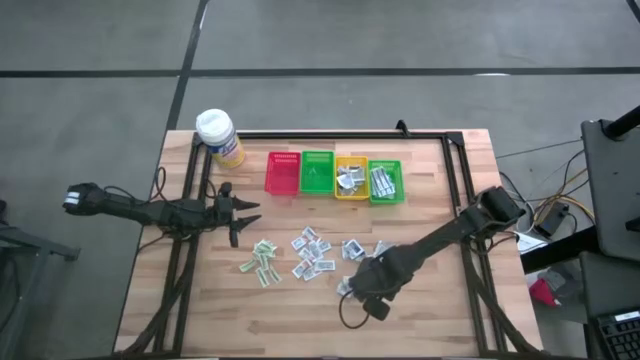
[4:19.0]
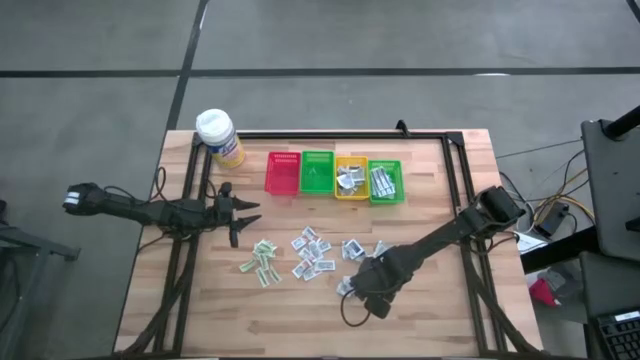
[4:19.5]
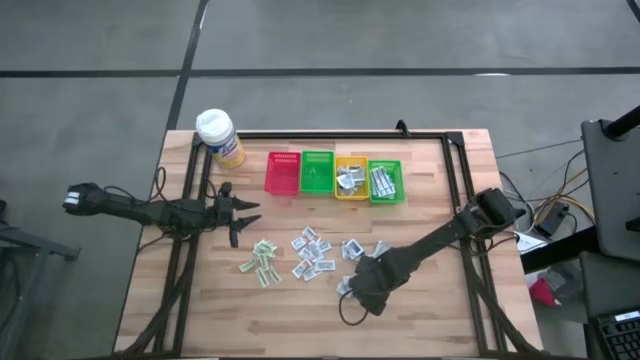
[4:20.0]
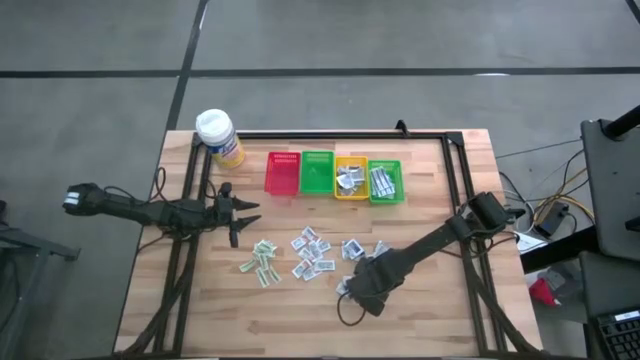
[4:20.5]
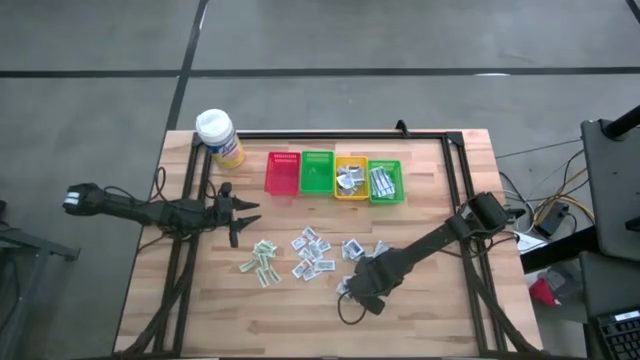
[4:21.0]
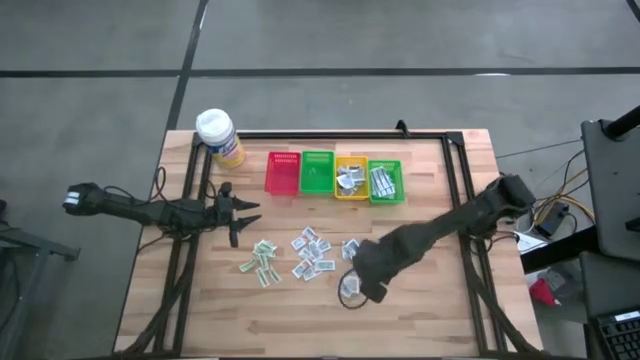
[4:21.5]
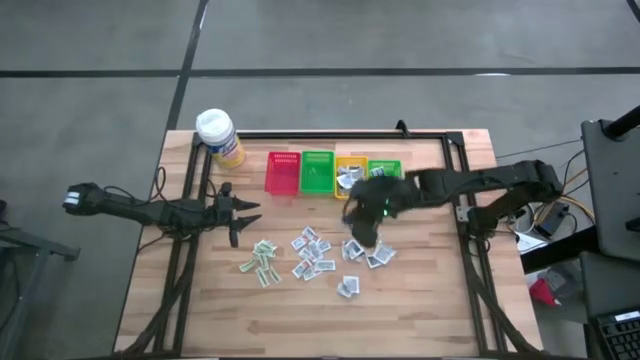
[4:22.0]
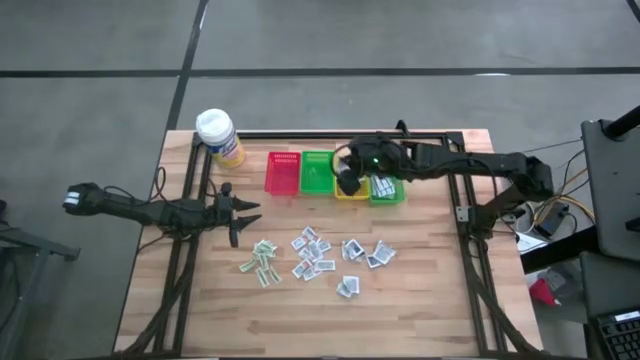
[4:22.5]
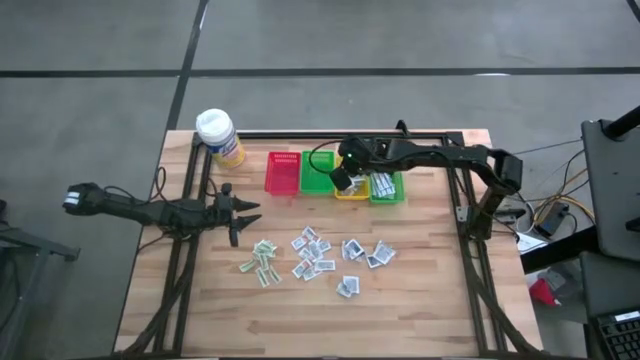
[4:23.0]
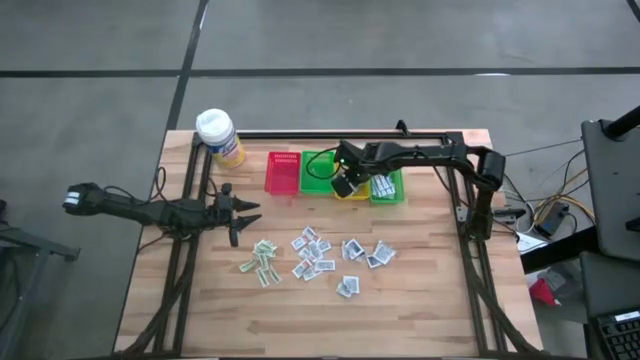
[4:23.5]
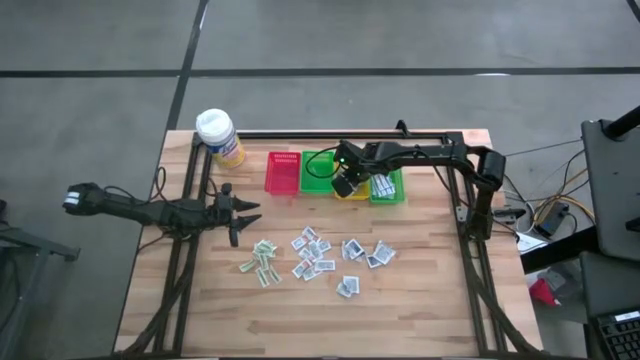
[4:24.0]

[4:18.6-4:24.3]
Task: Pick & Place First Aid Supplies
Put the blue alcohol pad into the yellow bin

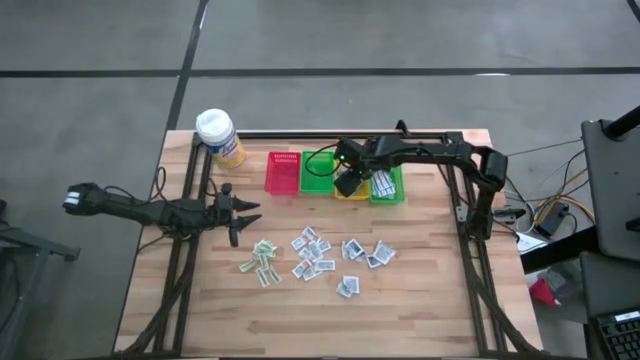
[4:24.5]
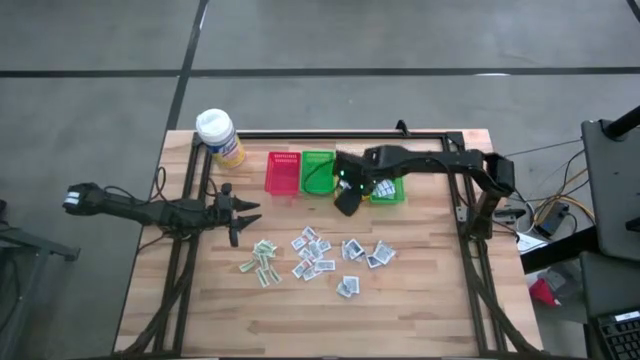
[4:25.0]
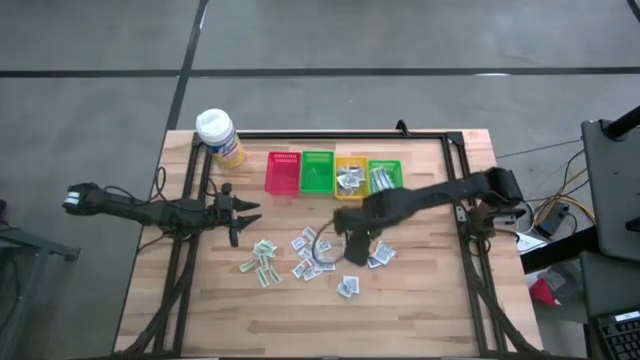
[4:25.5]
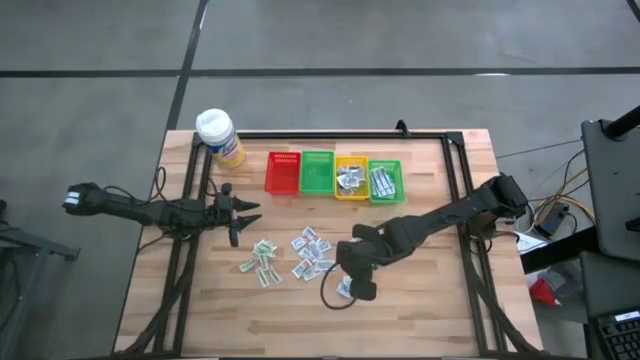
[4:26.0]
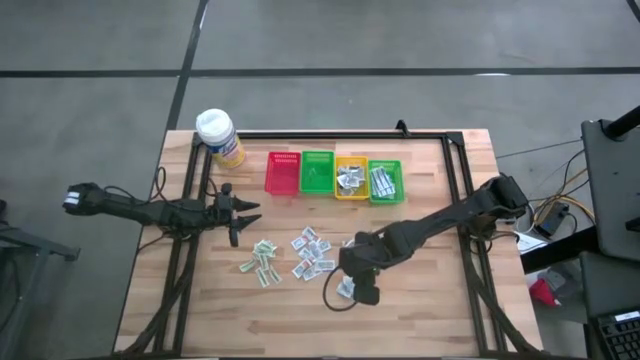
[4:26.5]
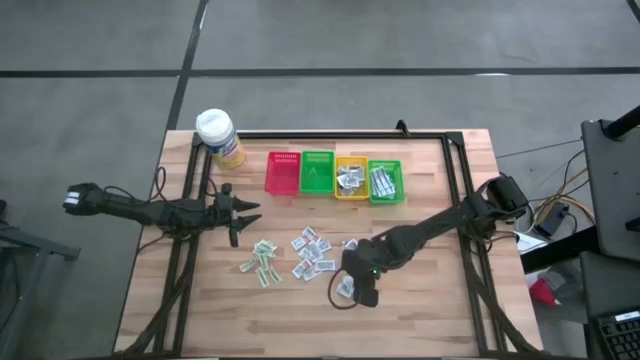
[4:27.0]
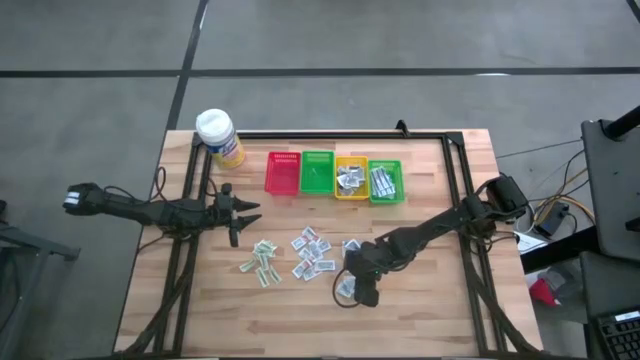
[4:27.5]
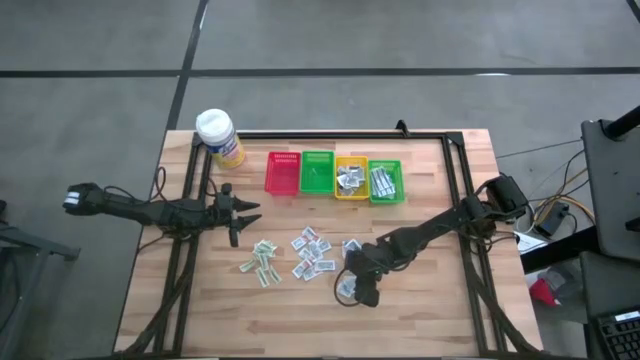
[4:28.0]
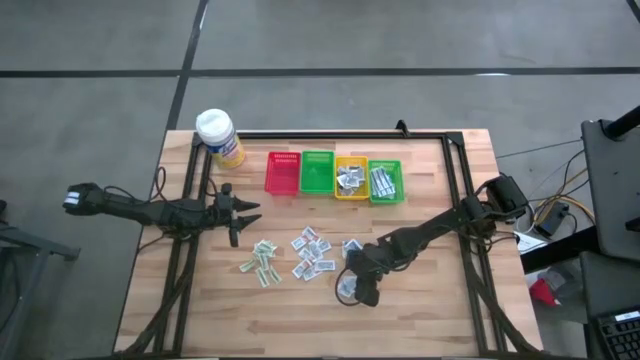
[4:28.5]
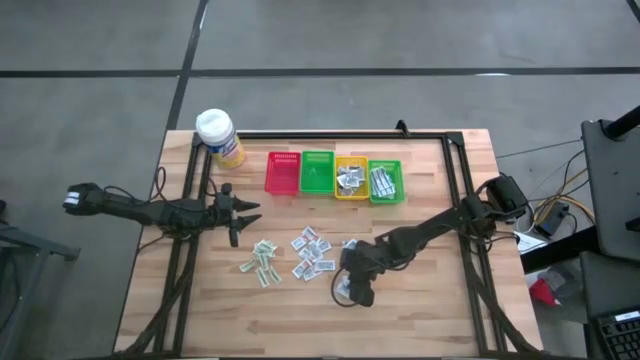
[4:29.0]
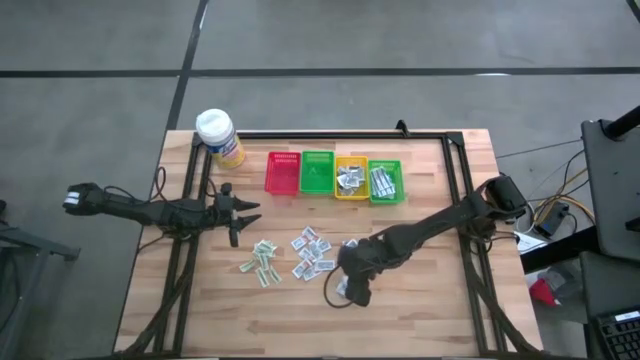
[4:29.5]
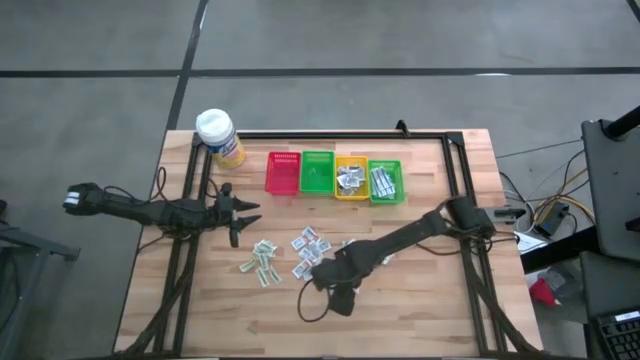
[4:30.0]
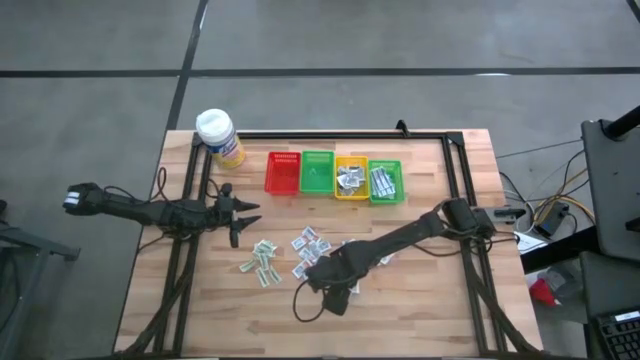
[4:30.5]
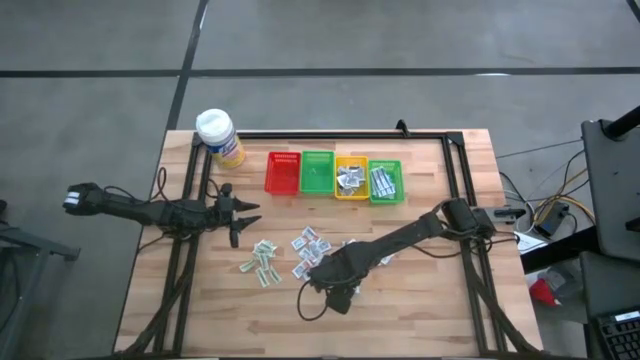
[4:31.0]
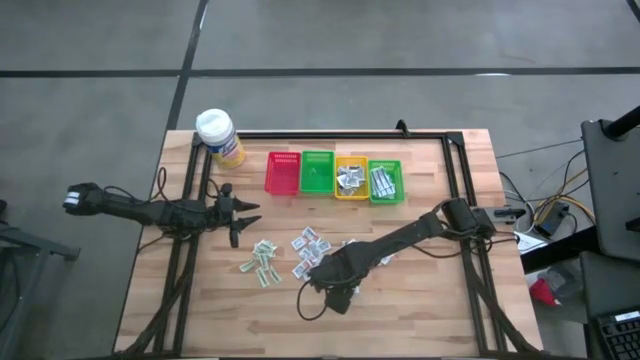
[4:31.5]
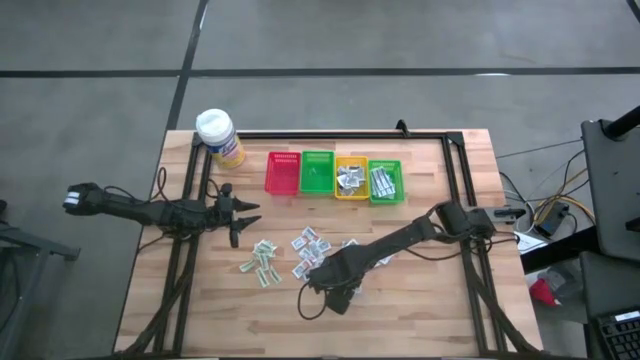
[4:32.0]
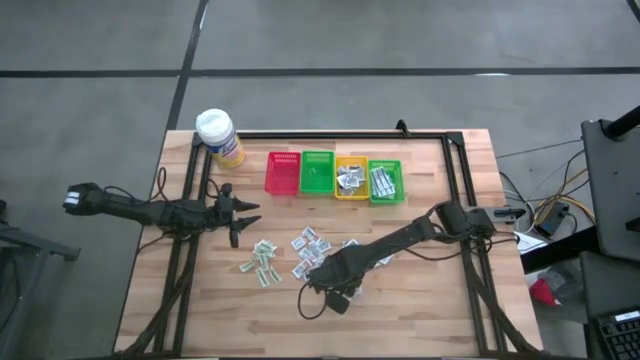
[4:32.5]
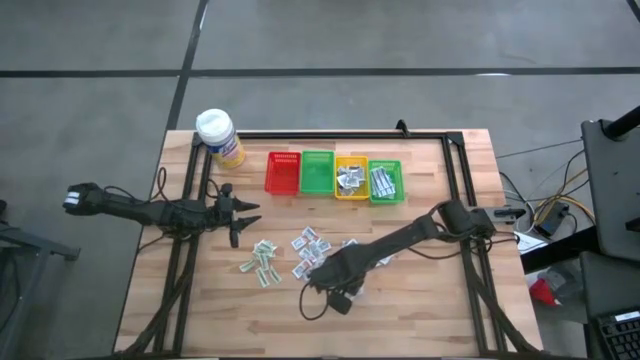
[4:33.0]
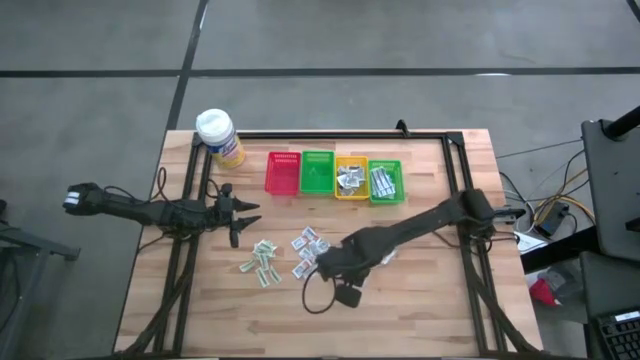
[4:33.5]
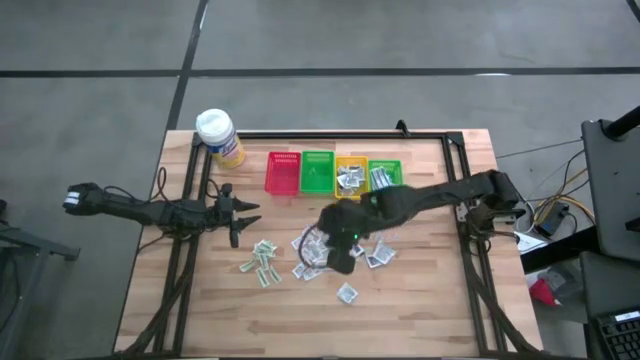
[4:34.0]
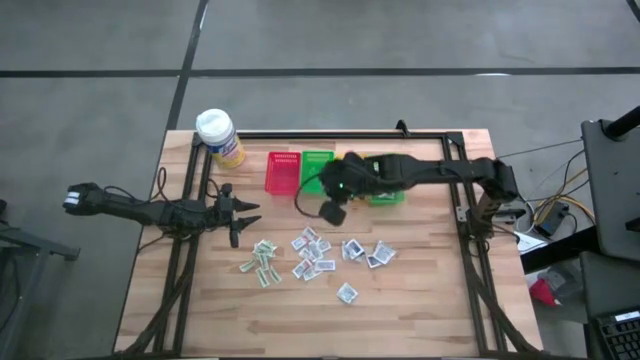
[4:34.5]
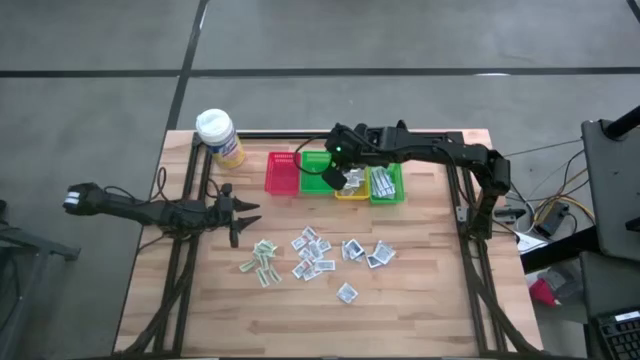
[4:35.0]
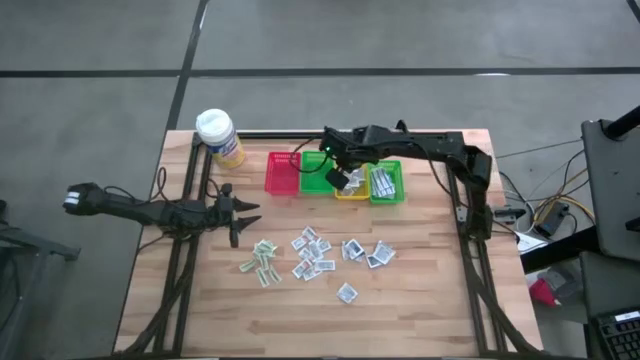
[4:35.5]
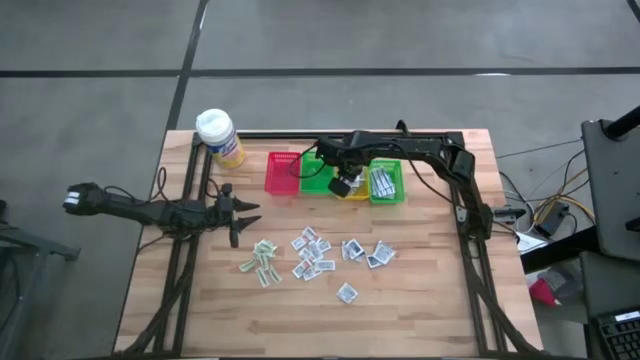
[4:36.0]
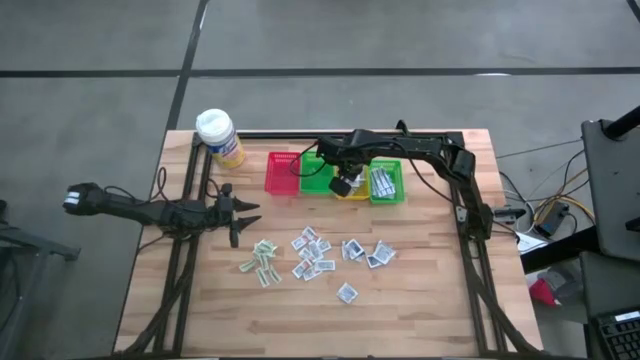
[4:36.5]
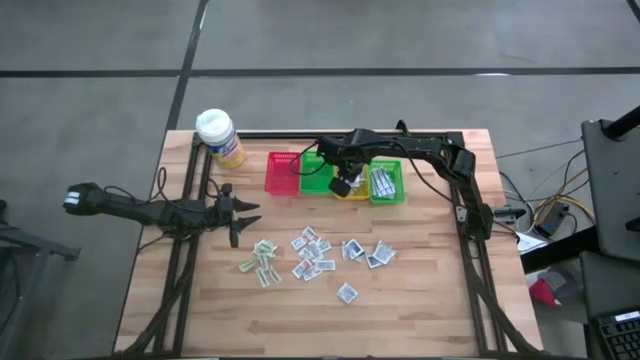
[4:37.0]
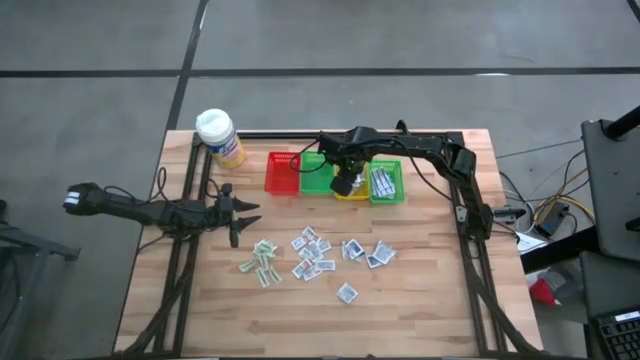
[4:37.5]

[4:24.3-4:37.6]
Put the blue alcohol pad into the yellow bin

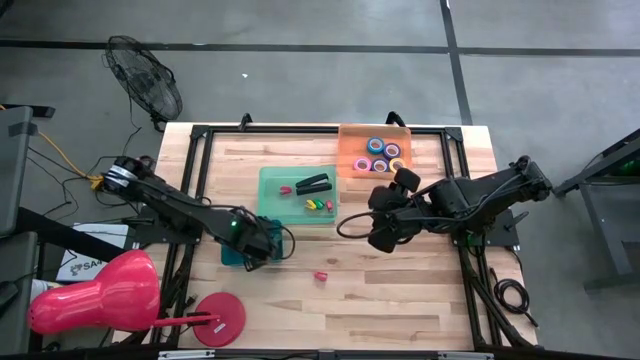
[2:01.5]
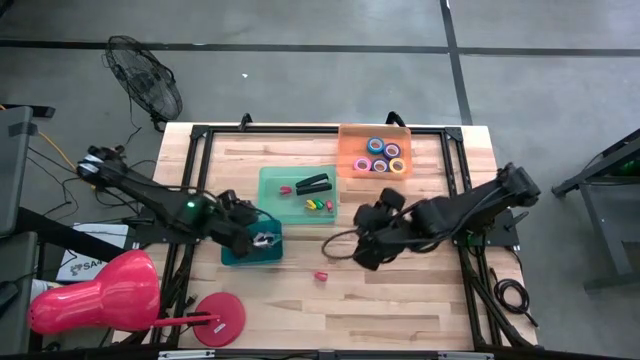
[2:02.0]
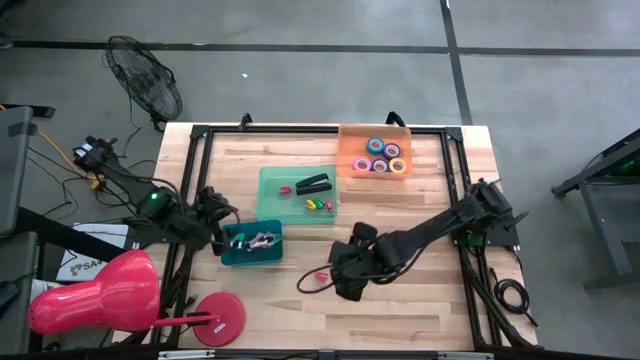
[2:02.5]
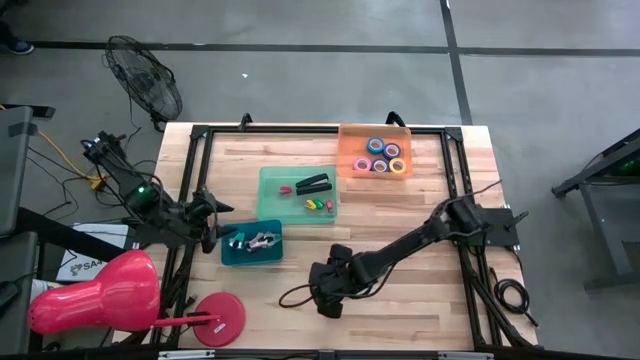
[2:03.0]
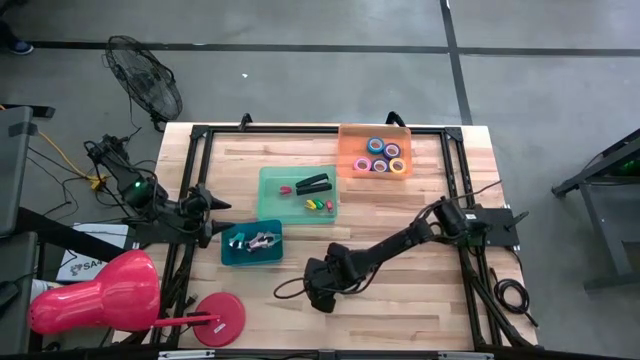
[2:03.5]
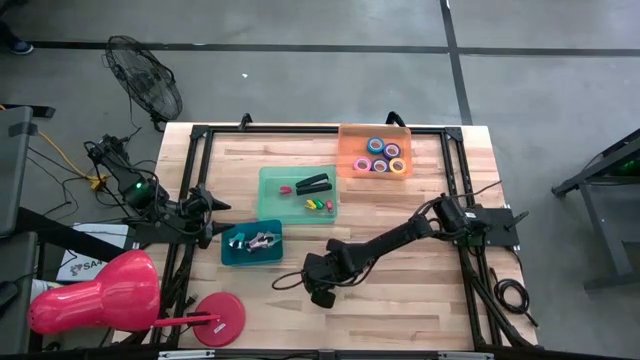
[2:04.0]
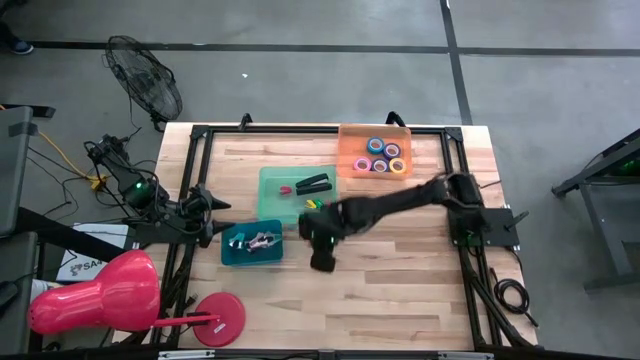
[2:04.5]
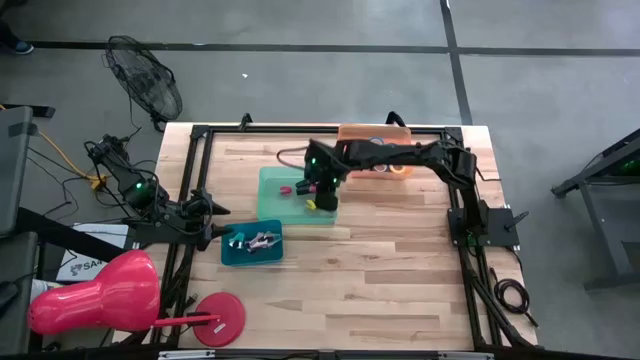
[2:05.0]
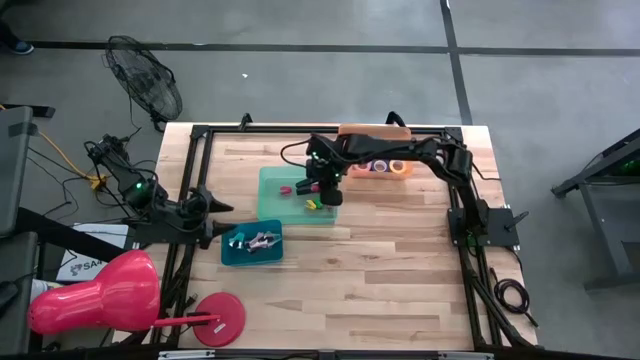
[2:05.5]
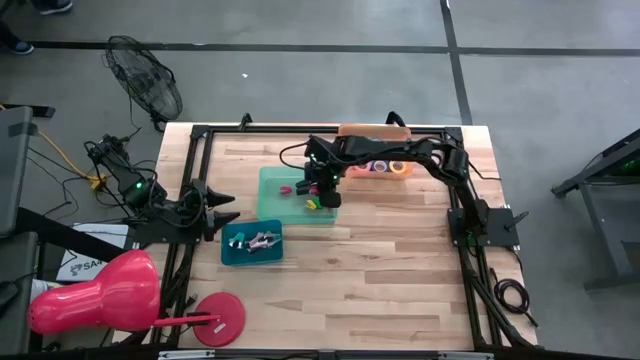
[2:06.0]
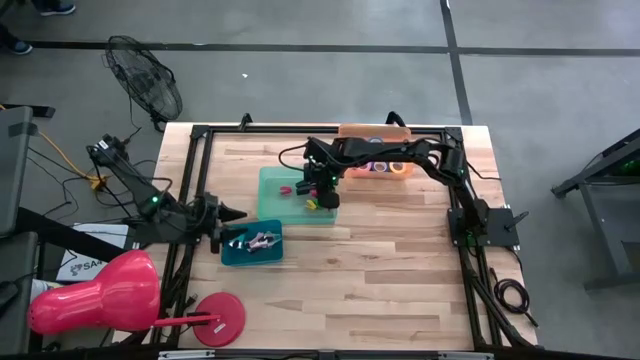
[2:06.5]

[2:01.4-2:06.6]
Task: Pick and place Stapler, Stapler remover, tape
Put the red small staple remover in the light green bin
